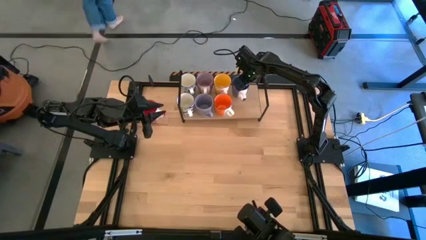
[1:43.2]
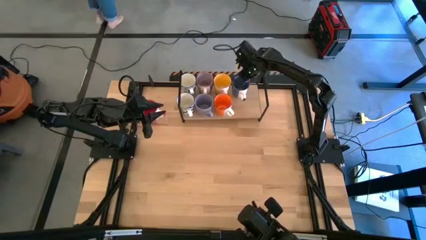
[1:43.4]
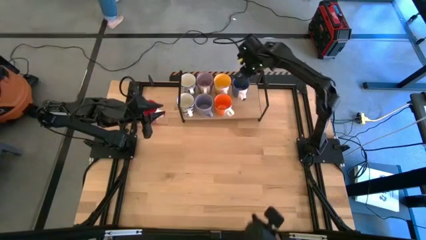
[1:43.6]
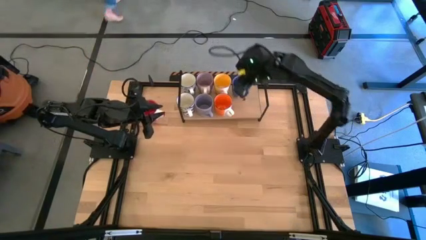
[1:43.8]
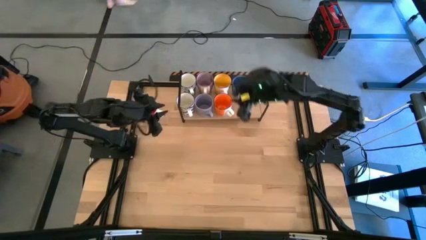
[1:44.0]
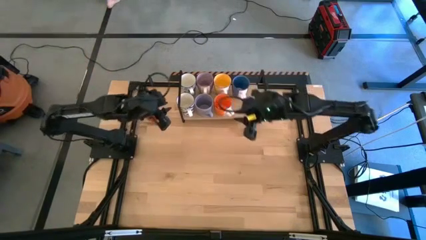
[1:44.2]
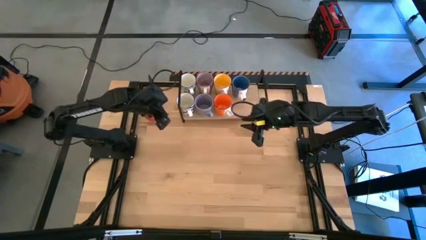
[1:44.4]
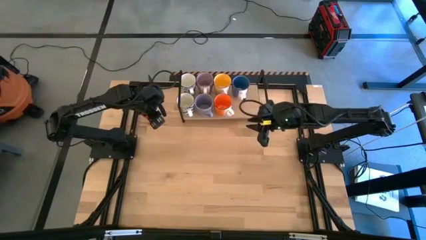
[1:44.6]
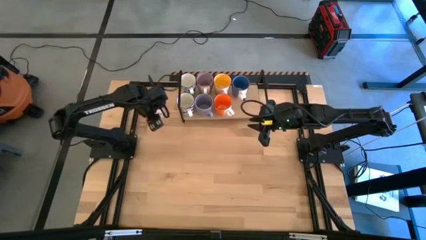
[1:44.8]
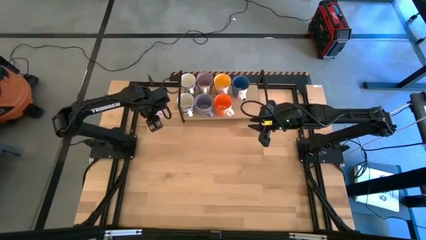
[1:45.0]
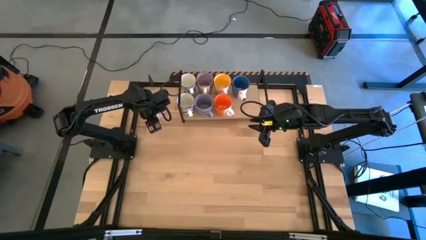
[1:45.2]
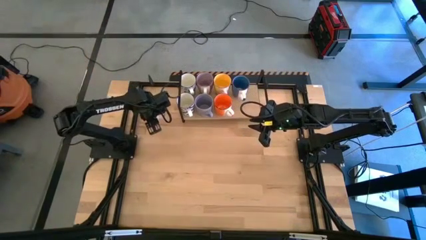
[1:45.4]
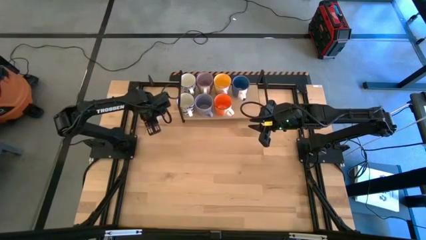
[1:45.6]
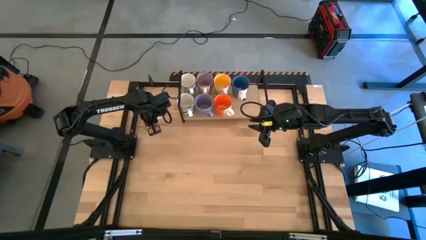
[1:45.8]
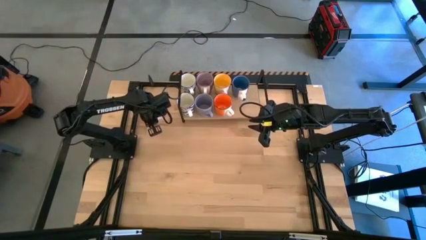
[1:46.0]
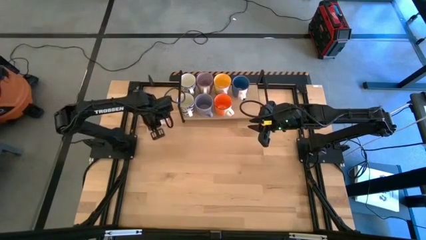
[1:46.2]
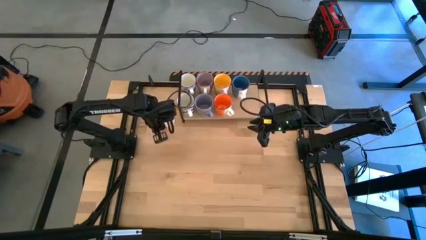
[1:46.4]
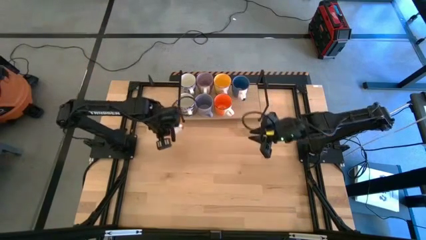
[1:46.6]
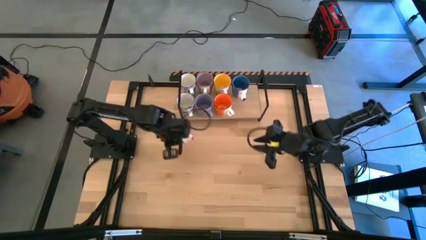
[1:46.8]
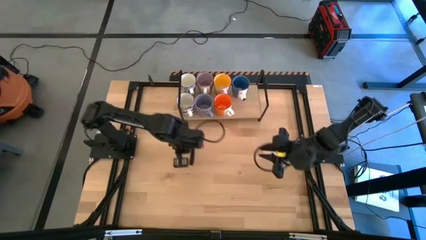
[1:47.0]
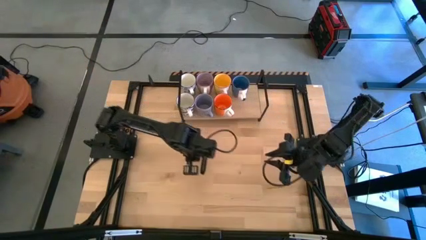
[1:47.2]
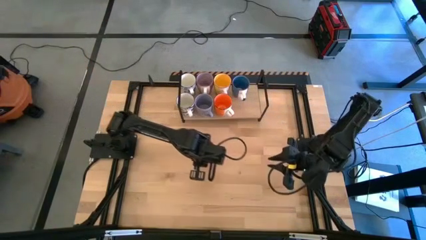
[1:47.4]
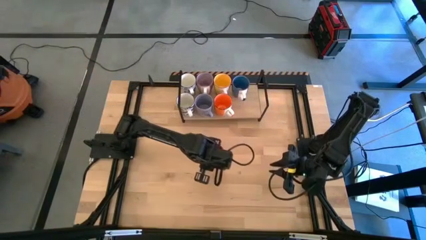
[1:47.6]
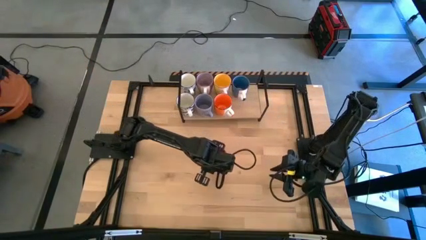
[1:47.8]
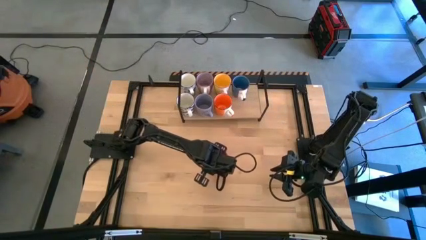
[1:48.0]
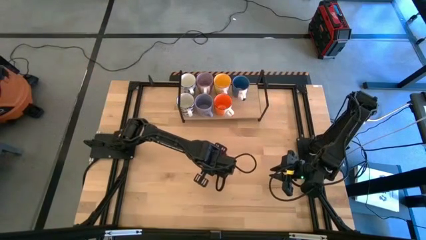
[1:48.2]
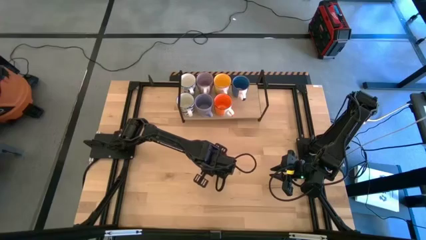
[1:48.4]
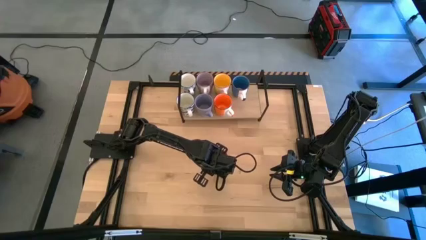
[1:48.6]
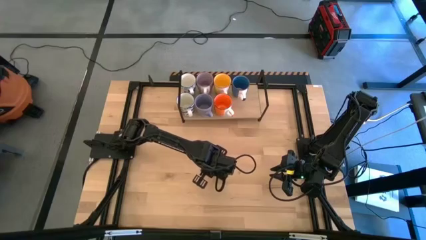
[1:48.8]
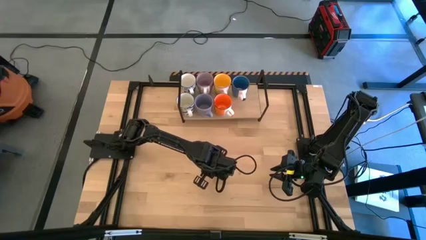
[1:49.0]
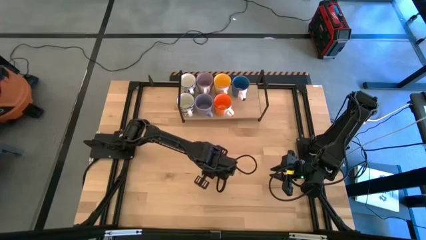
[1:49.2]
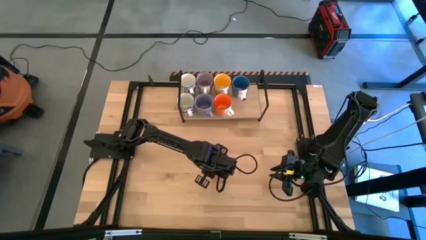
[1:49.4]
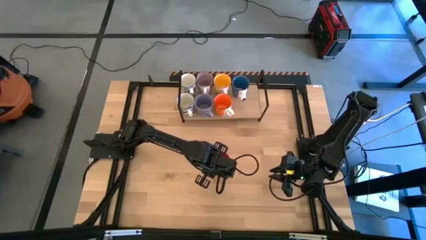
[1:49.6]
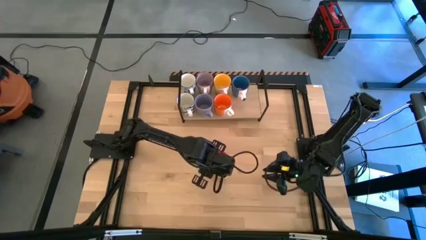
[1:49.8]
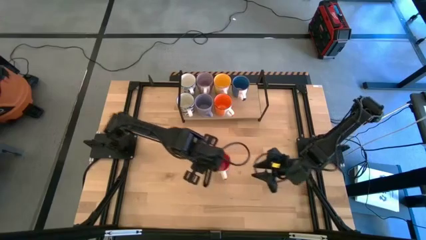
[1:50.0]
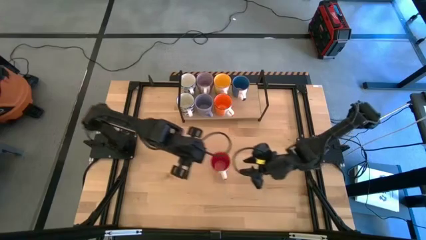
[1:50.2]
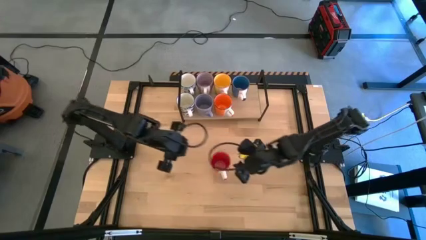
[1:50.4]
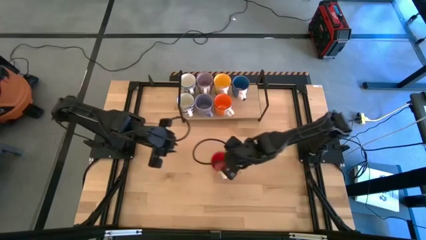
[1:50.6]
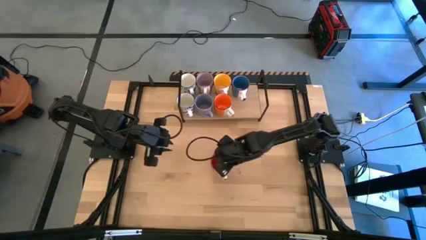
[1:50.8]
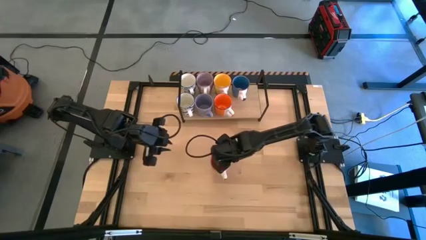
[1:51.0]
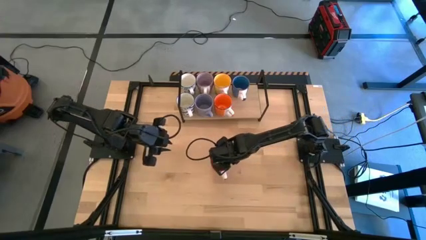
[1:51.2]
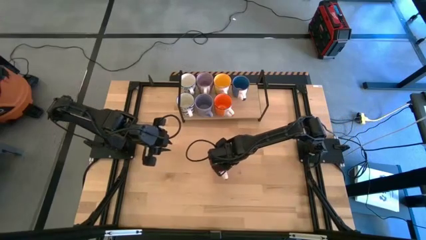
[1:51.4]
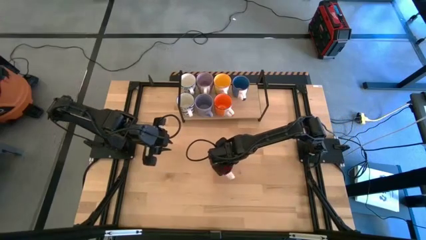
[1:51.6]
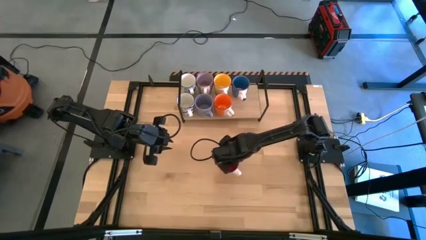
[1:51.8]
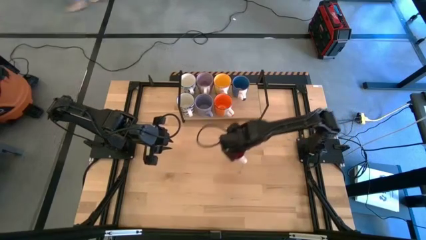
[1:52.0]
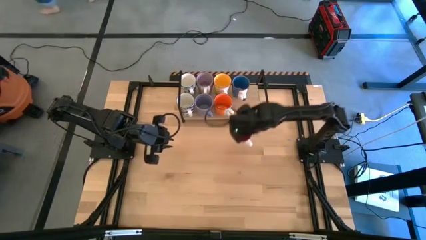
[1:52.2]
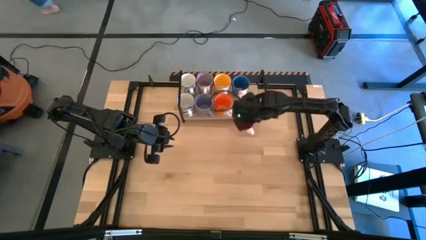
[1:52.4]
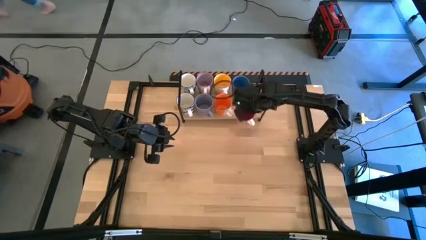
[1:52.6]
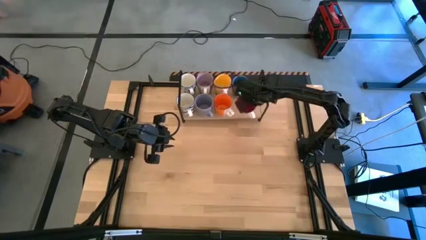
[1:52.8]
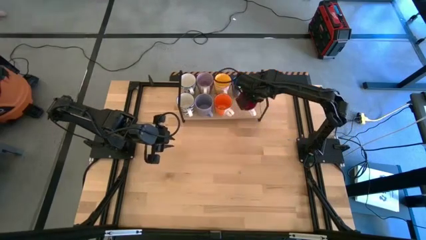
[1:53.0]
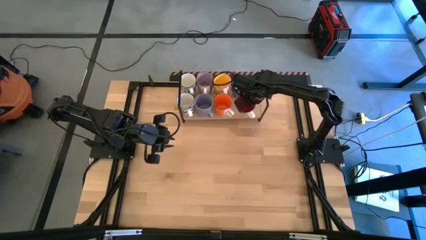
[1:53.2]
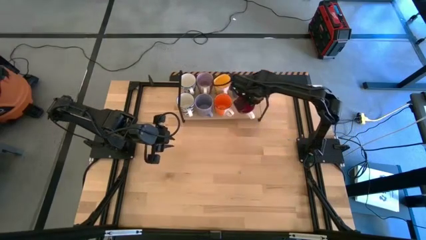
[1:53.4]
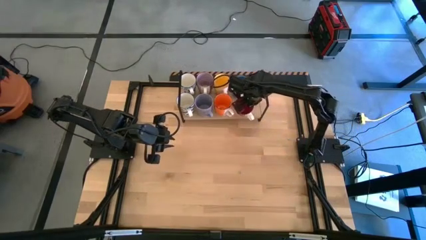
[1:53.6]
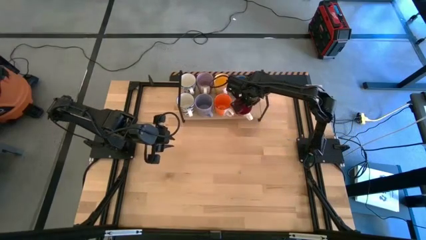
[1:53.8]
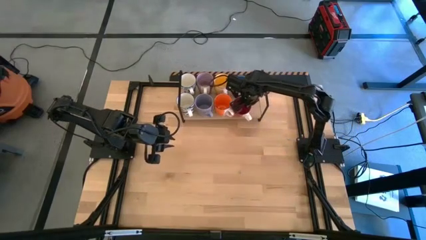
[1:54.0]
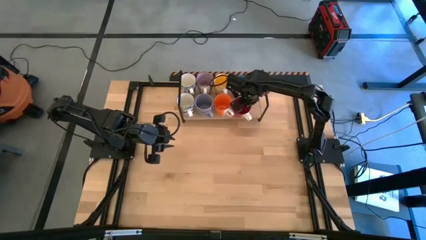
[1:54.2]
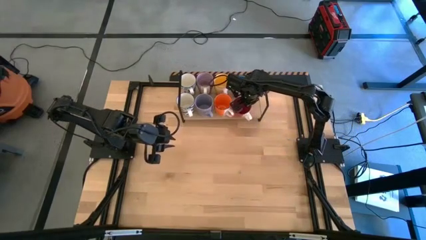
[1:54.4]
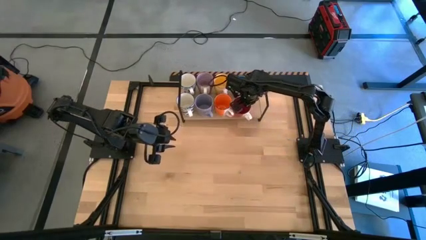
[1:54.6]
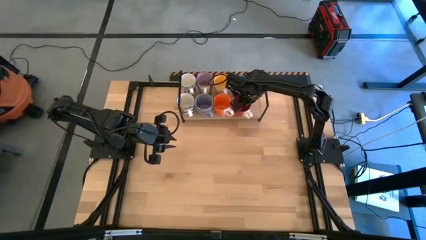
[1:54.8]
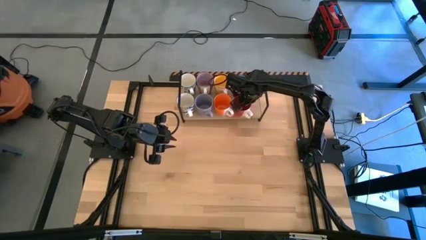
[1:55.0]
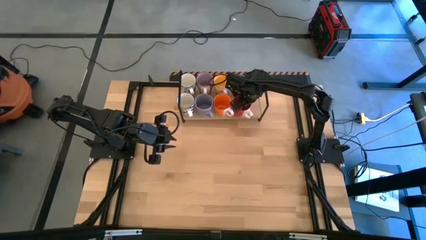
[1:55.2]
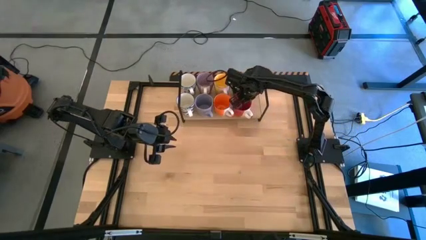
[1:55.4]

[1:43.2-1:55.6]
Task: Place coffee mugs
Put the red mug on the shelf
